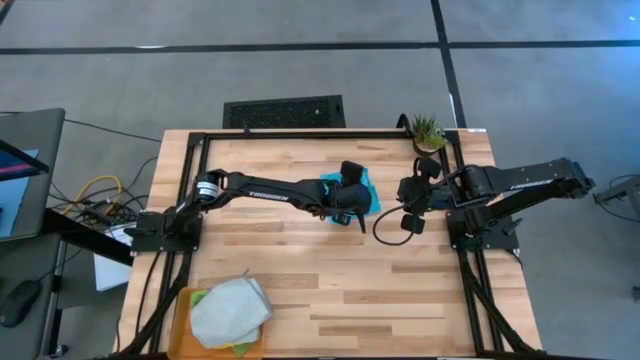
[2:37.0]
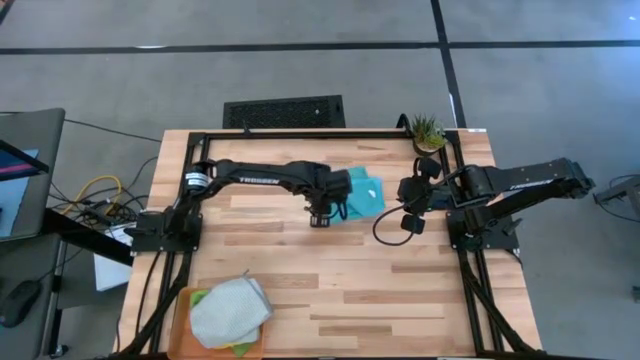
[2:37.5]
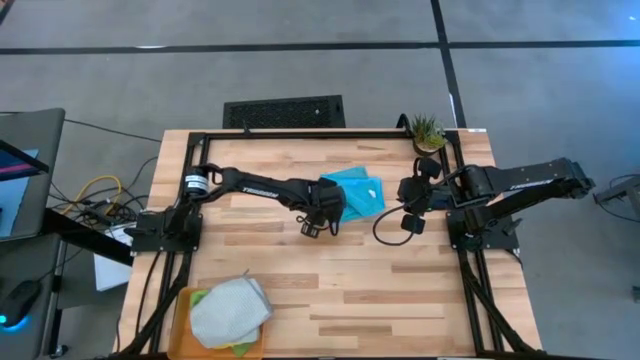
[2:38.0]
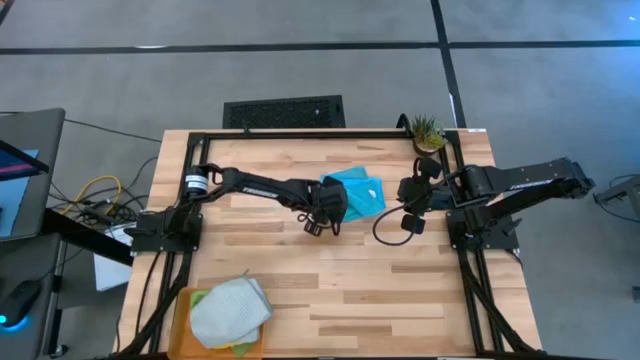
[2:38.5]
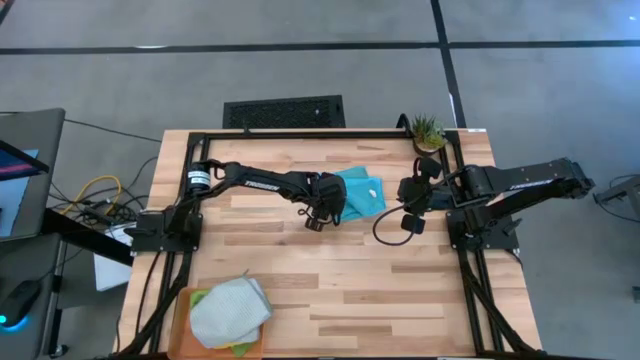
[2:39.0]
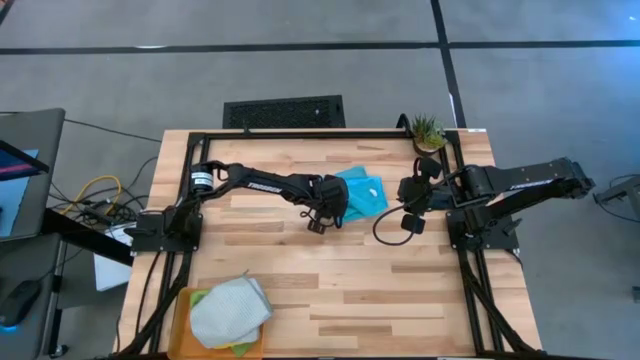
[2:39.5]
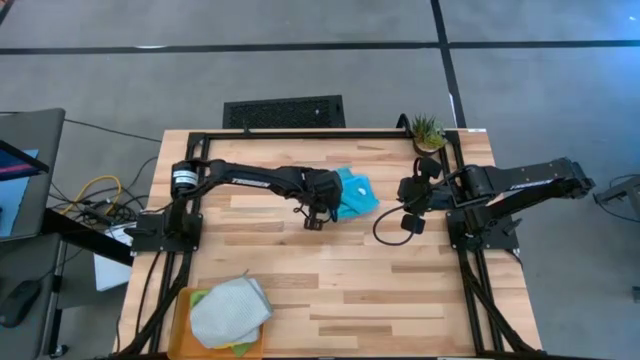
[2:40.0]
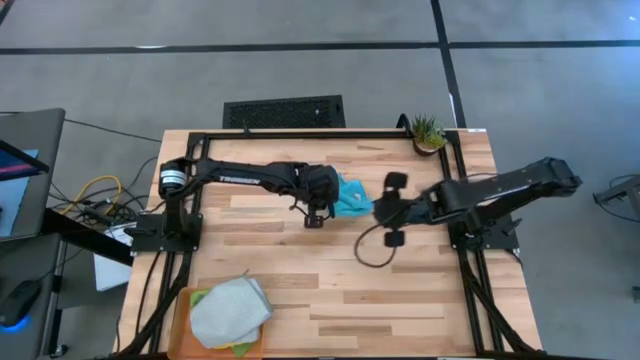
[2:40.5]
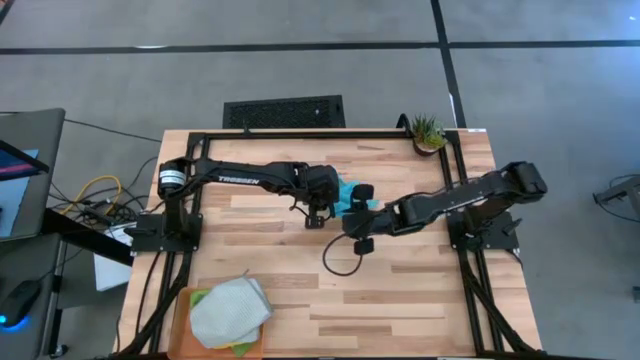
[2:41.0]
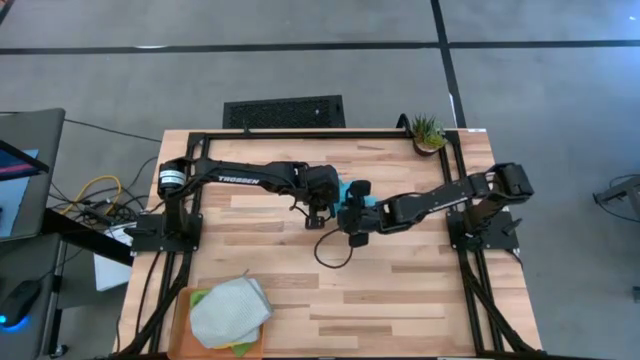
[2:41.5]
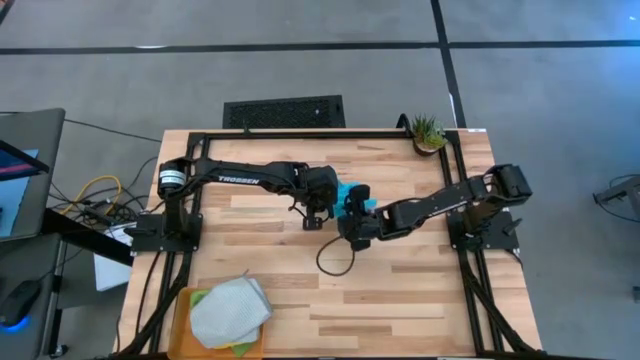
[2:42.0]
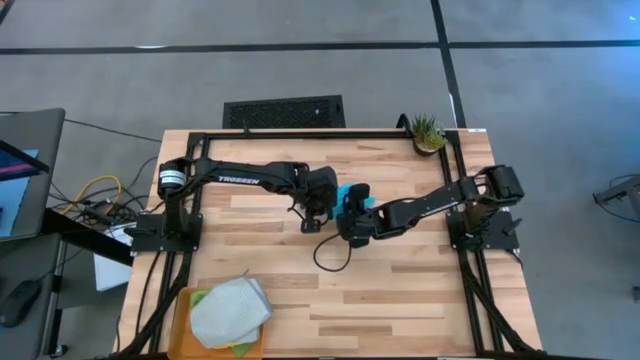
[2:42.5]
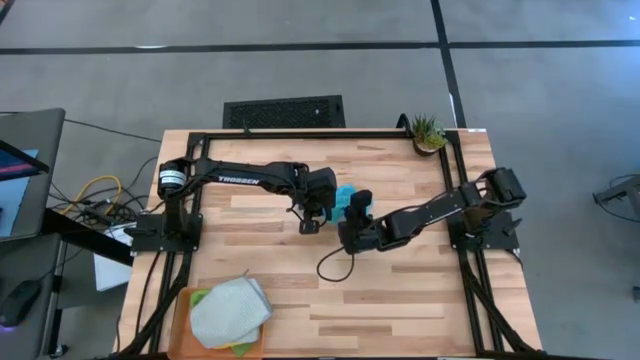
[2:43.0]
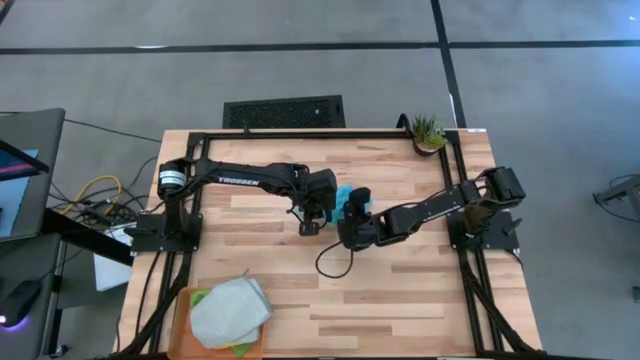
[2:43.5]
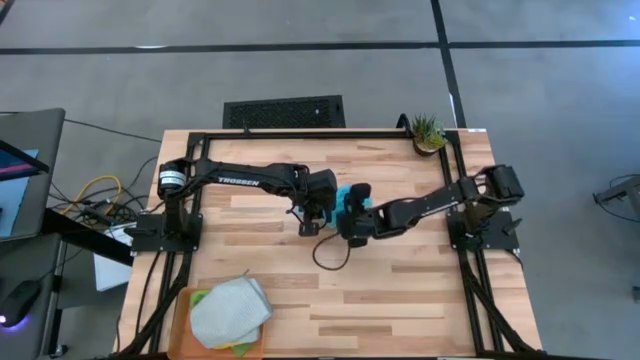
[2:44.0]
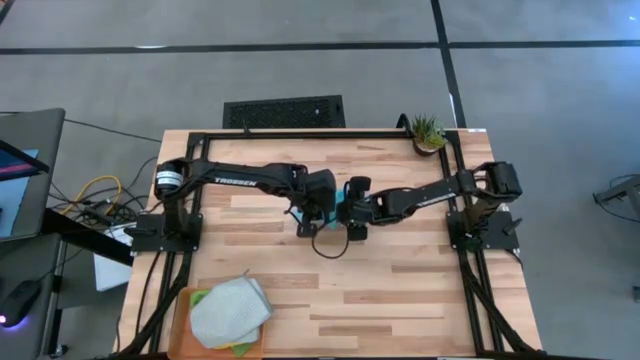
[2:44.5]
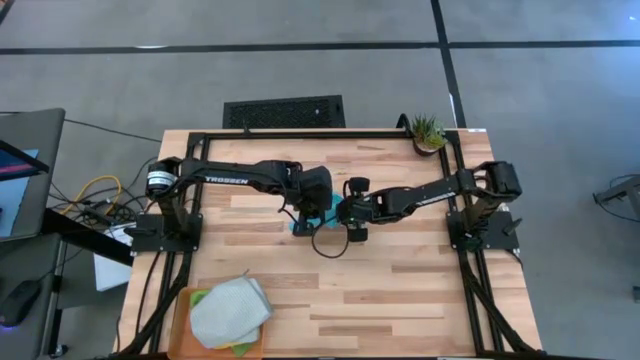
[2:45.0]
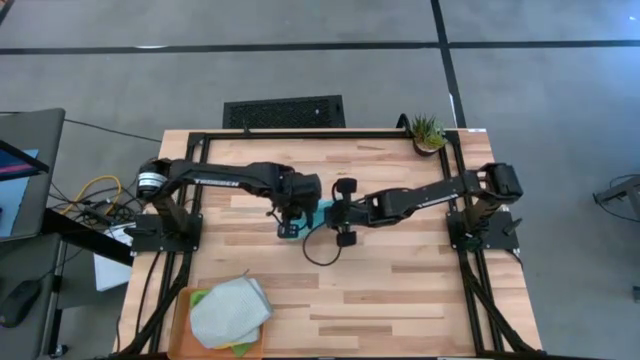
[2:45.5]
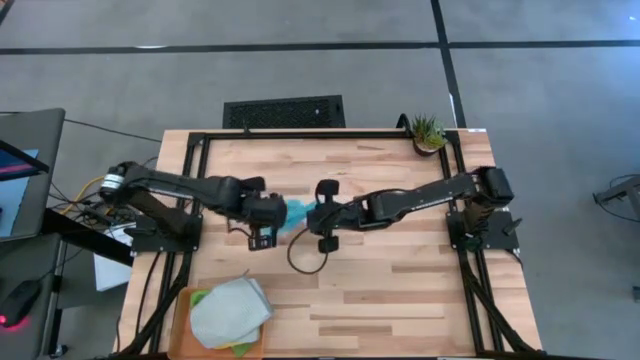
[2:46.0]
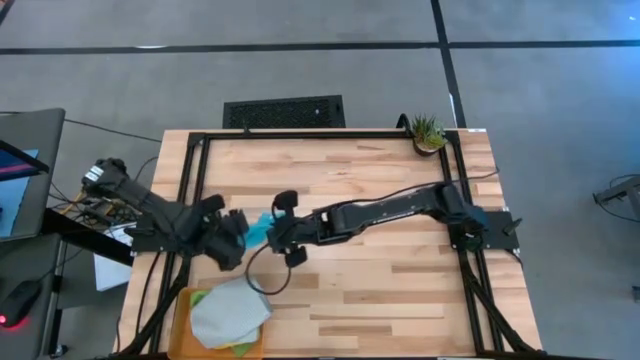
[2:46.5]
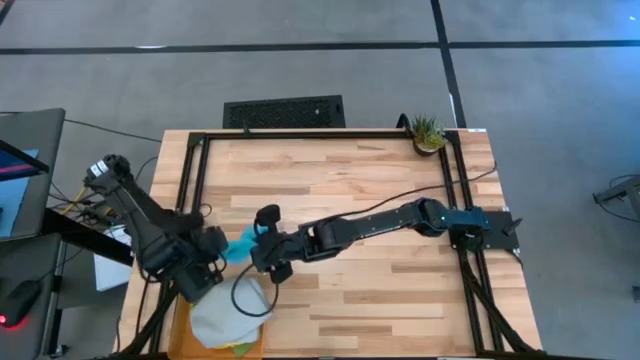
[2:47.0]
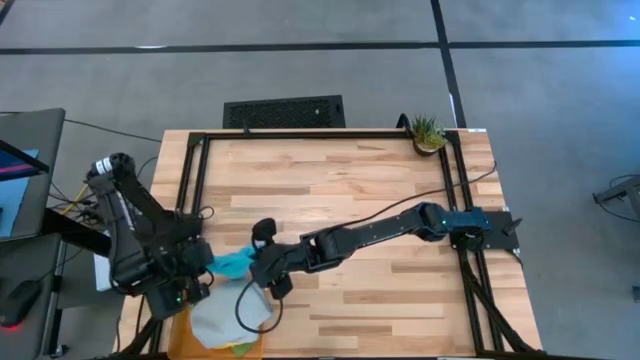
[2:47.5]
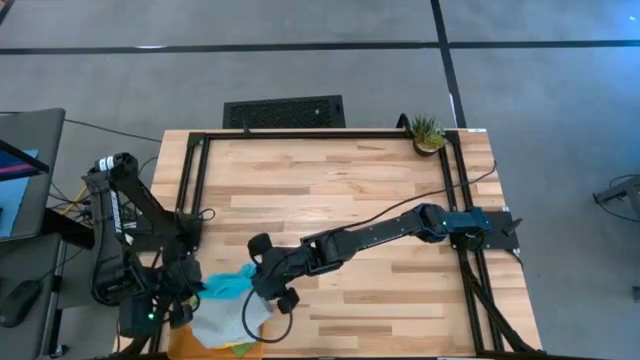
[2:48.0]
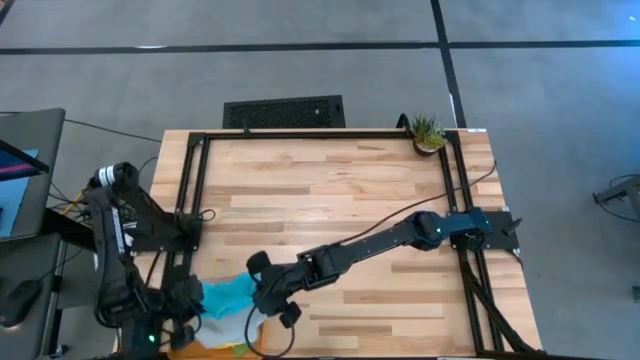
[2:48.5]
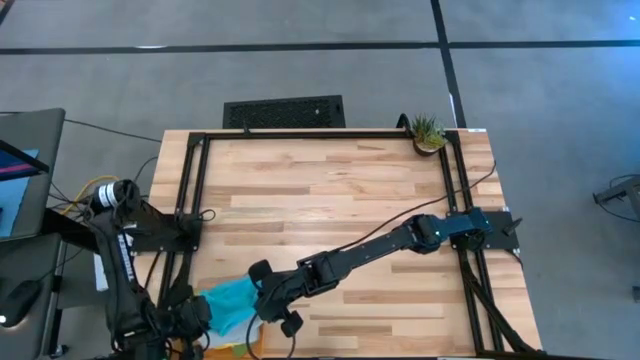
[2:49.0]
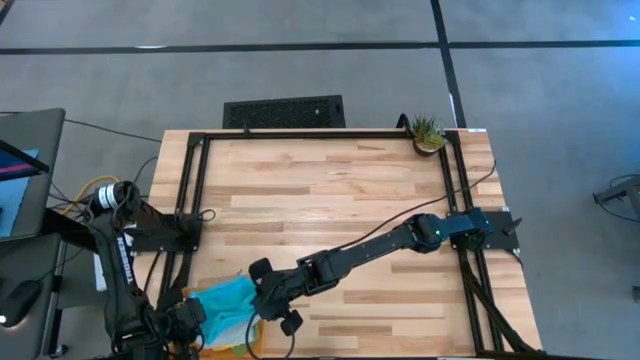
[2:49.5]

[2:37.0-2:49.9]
Task: Fold microfiber towels
Put the folded blue towel into the orange bin

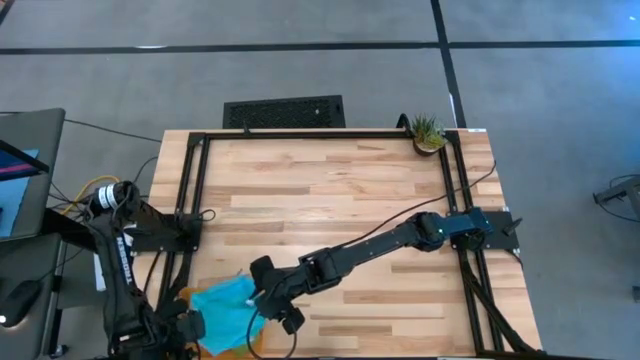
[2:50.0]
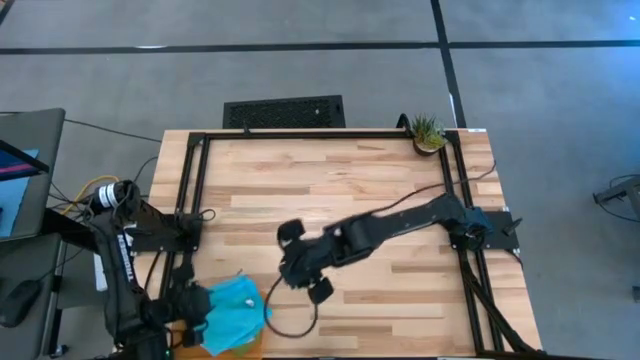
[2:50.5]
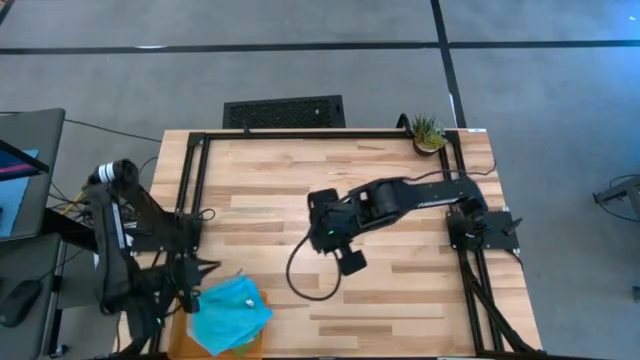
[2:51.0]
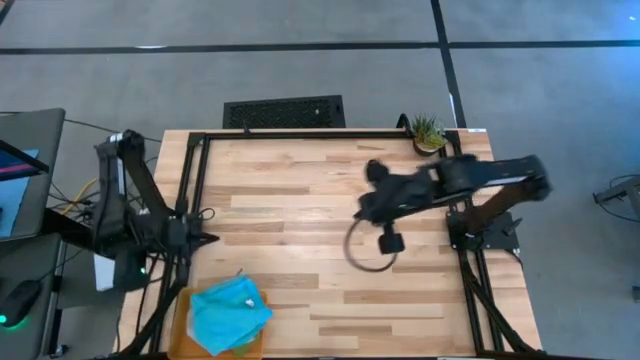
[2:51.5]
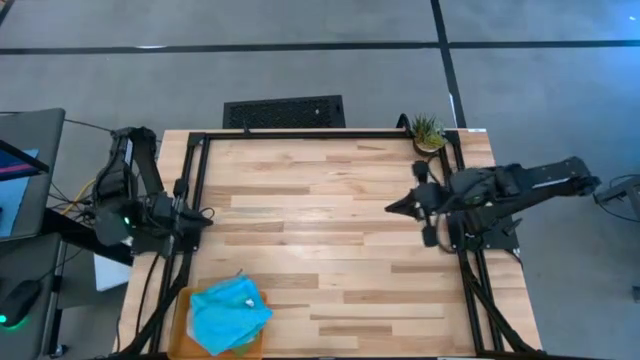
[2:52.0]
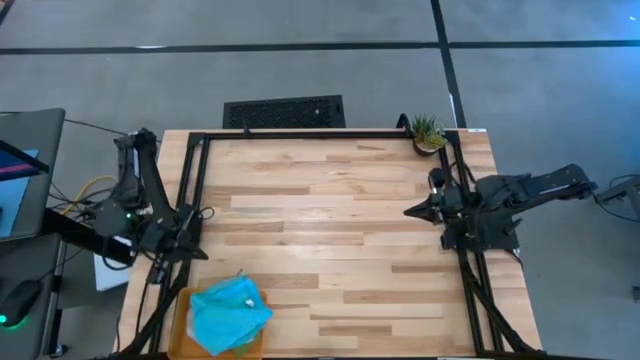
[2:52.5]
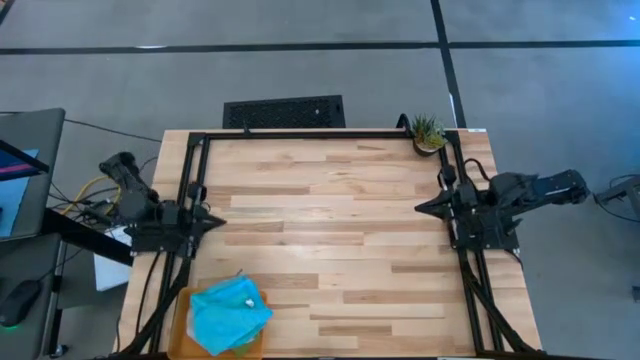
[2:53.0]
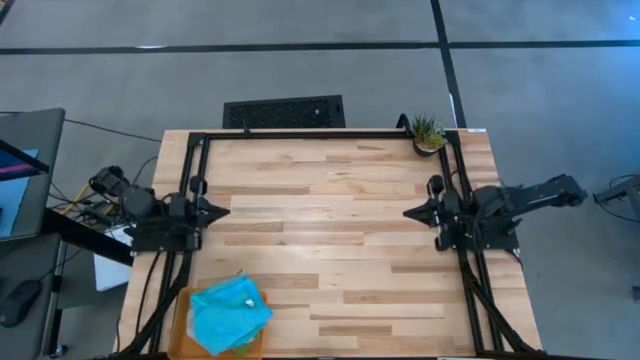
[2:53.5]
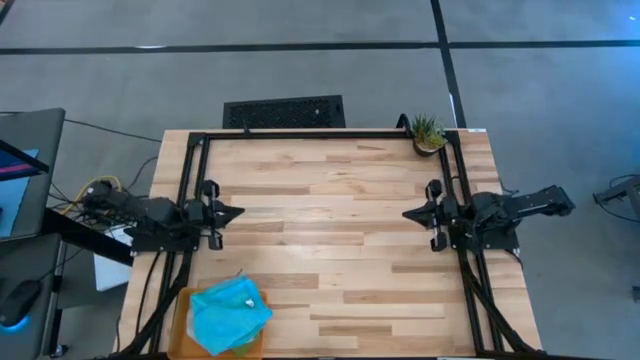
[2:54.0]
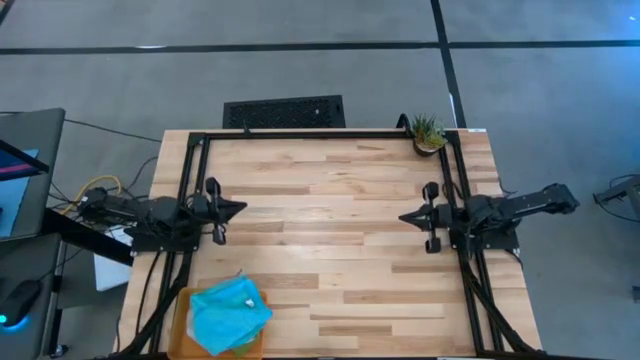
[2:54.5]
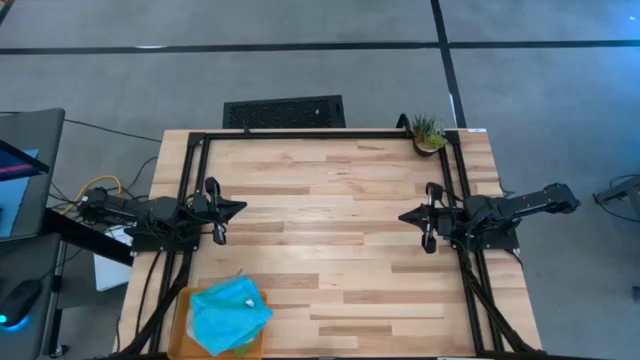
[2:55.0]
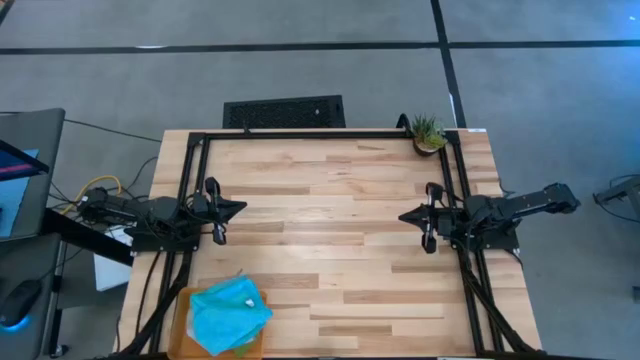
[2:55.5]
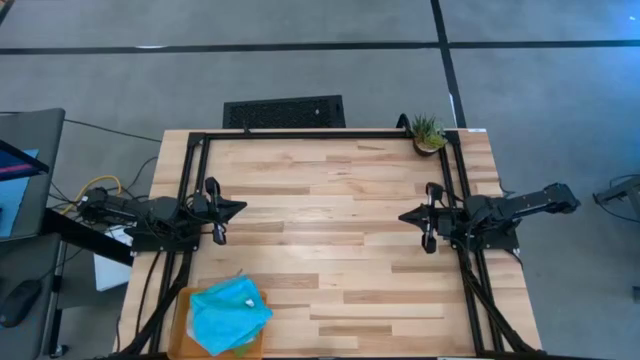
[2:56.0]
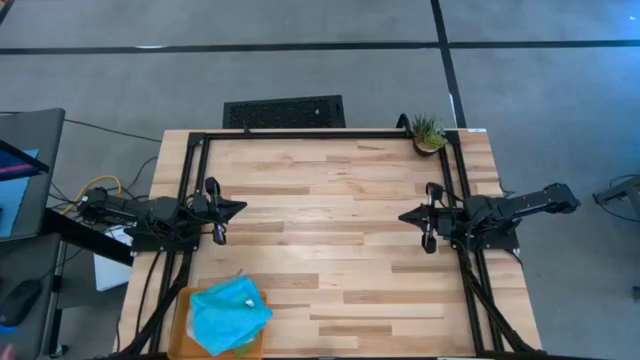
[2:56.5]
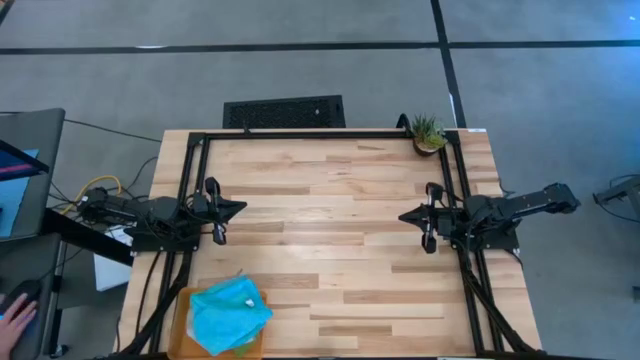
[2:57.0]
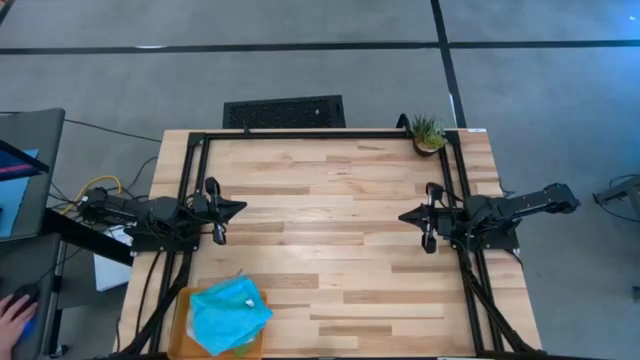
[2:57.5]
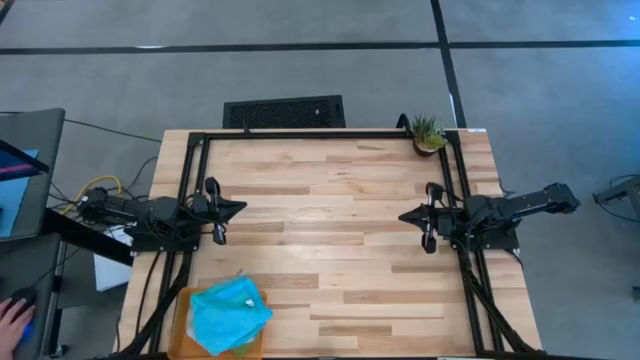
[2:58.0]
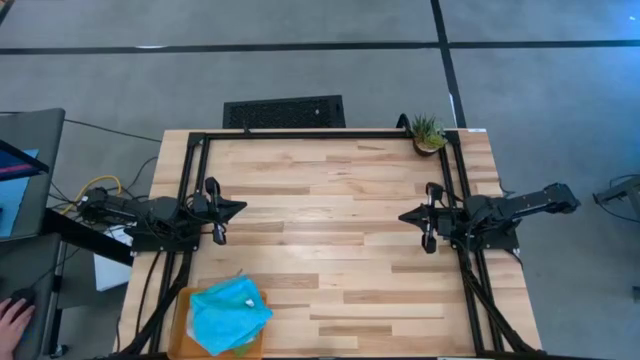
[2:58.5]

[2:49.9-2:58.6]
Return to Home Position
